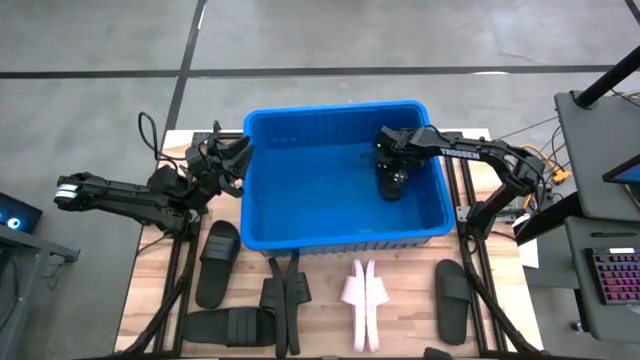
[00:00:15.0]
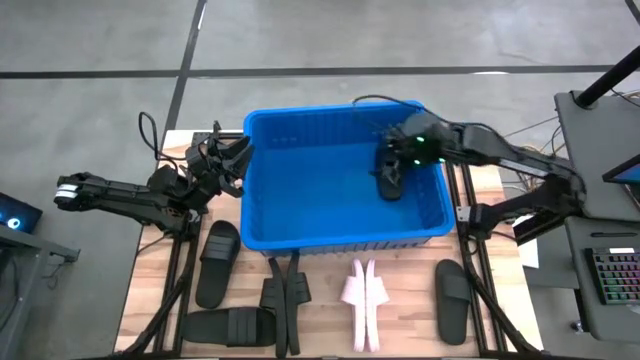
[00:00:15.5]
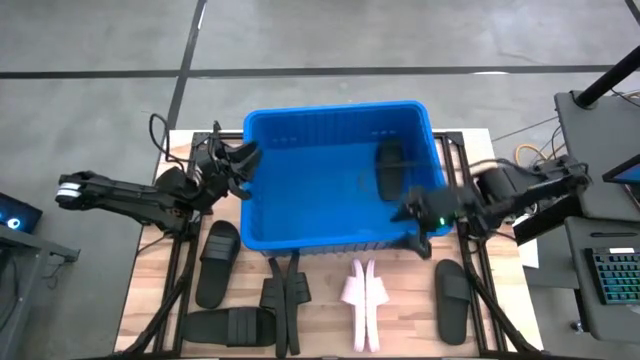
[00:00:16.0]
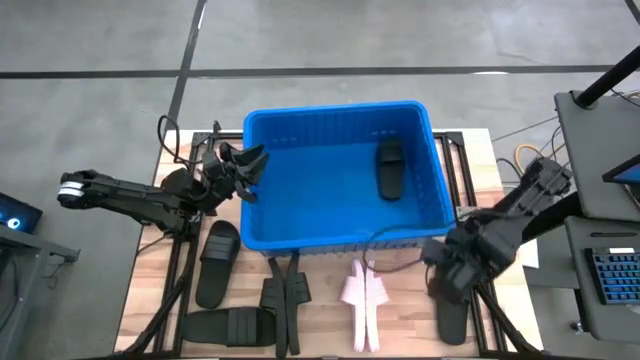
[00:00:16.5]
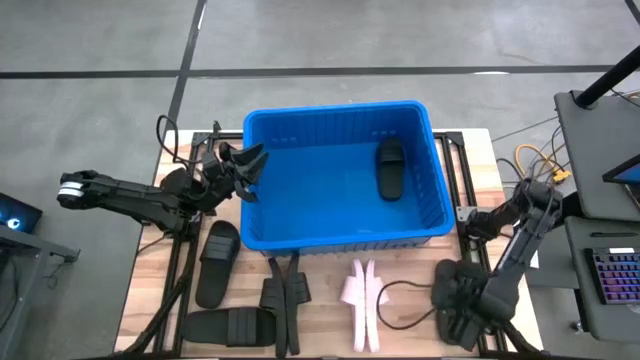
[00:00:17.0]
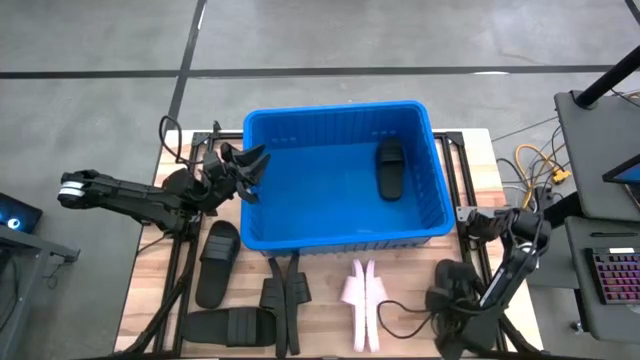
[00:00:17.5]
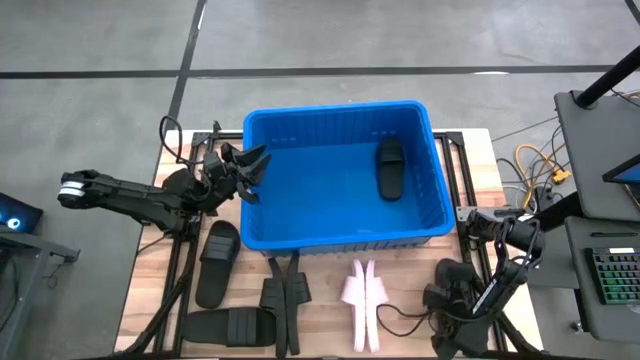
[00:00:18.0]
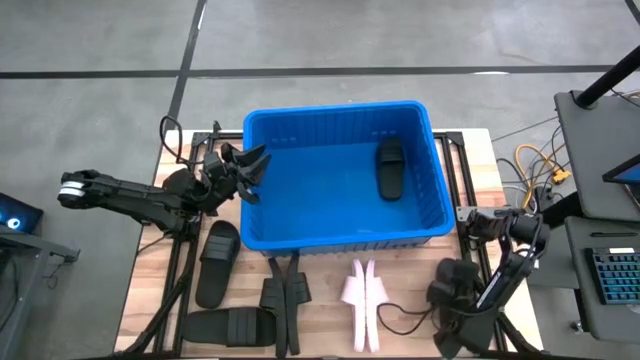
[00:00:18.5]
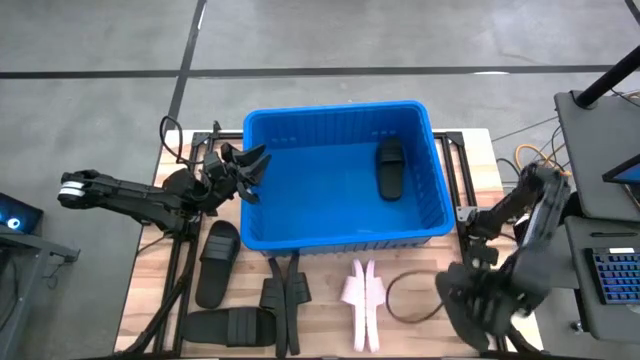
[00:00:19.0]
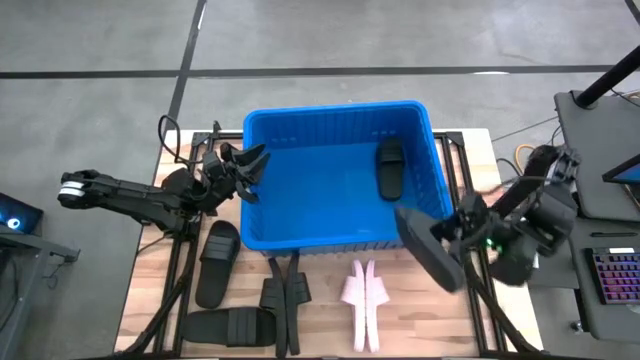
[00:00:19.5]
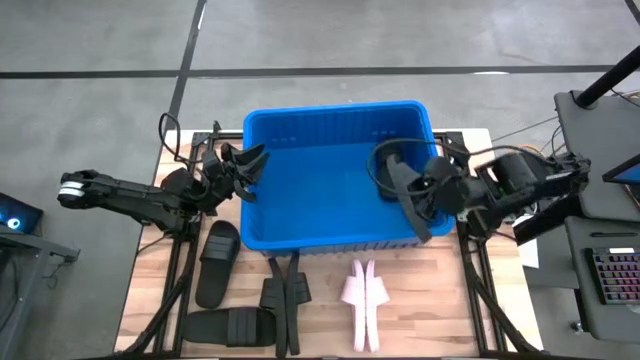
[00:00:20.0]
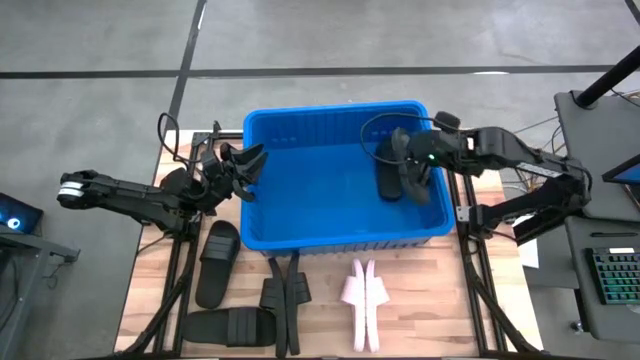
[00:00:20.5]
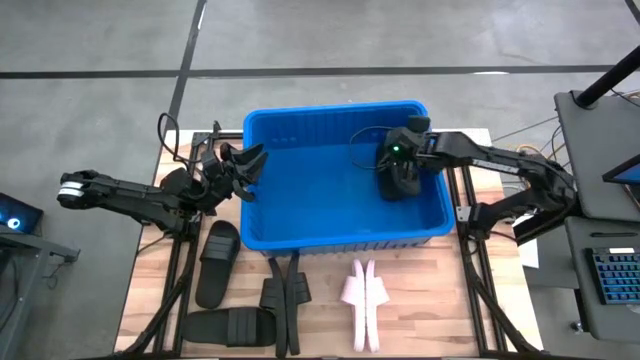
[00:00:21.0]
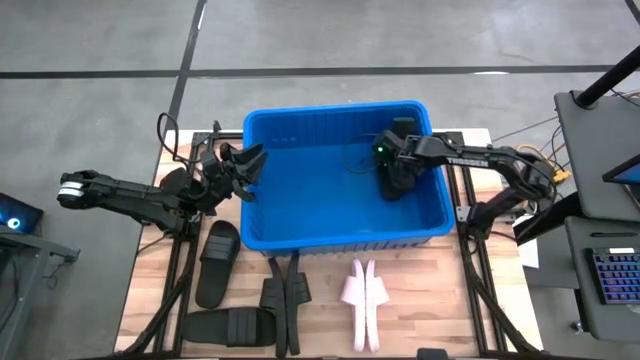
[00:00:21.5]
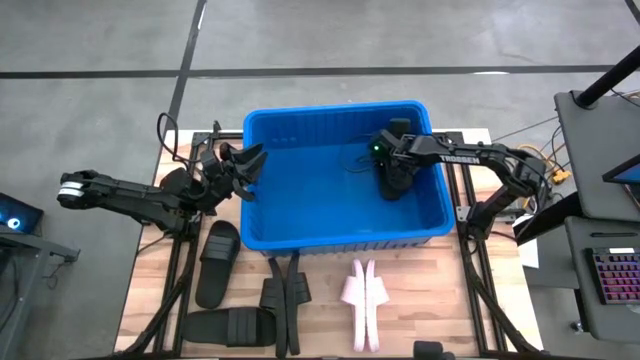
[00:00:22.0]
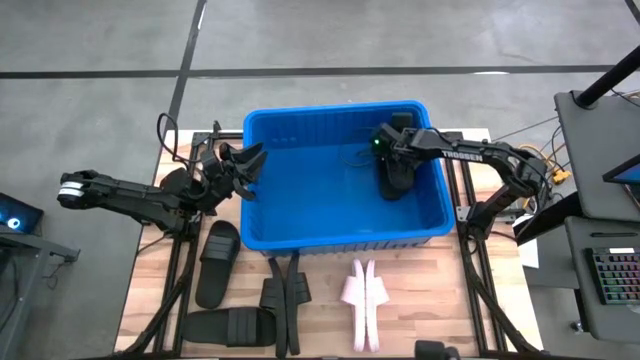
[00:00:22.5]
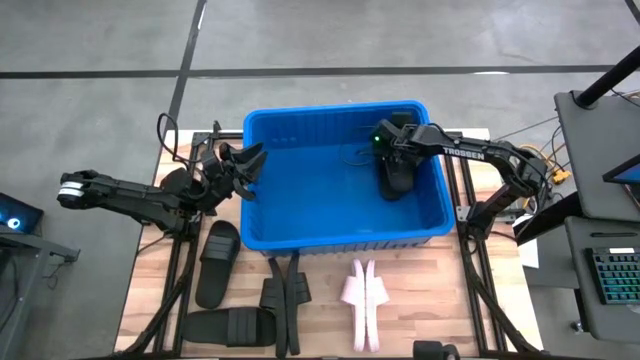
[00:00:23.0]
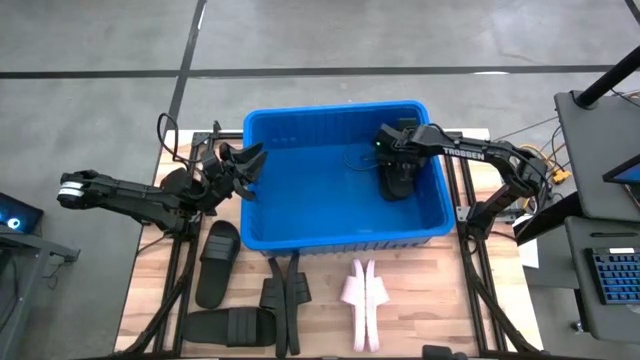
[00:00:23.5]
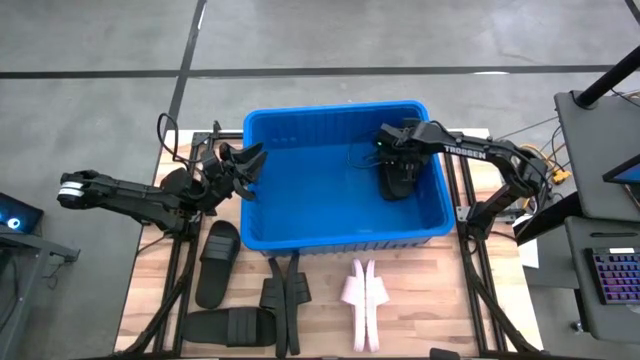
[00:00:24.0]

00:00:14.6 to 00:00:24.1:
Task: Pick and place slides into bin
Put the black slide into the blue bin

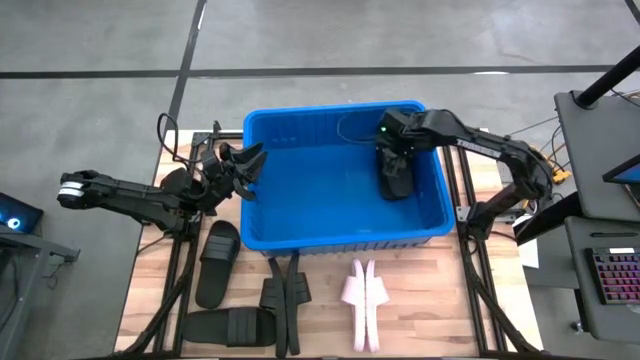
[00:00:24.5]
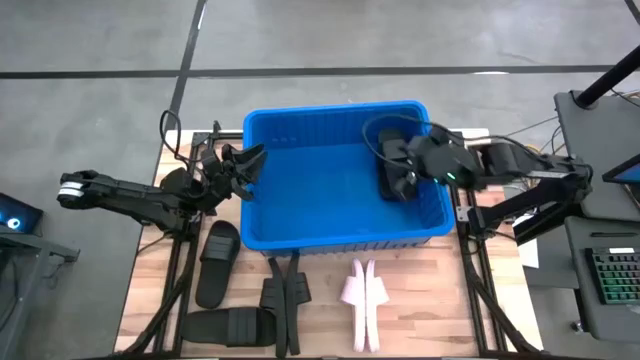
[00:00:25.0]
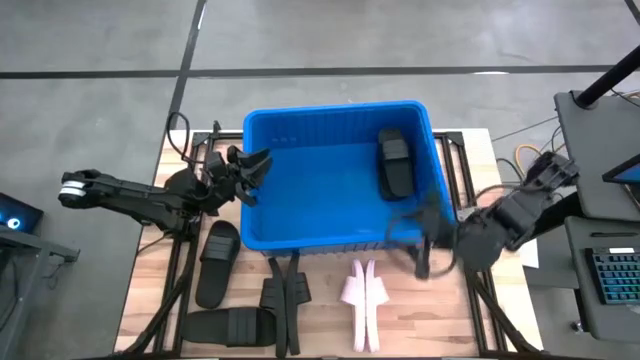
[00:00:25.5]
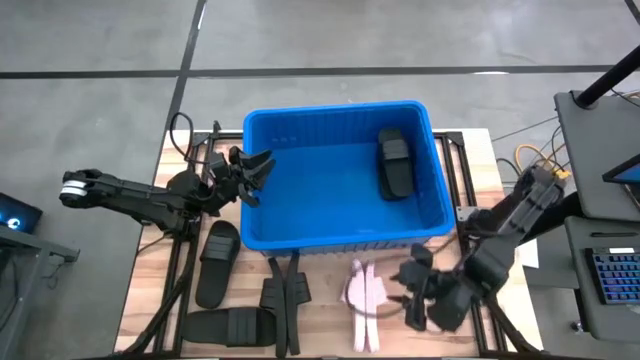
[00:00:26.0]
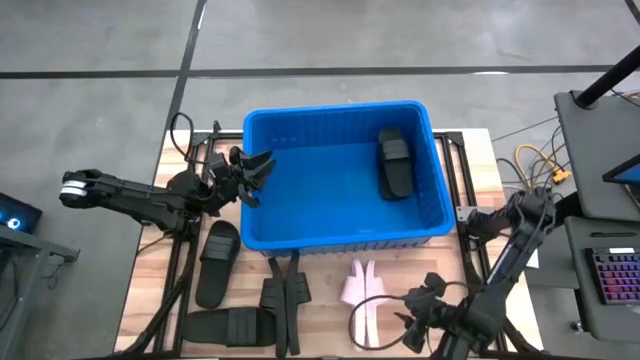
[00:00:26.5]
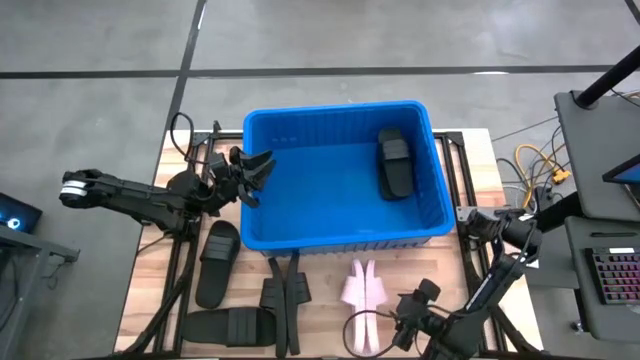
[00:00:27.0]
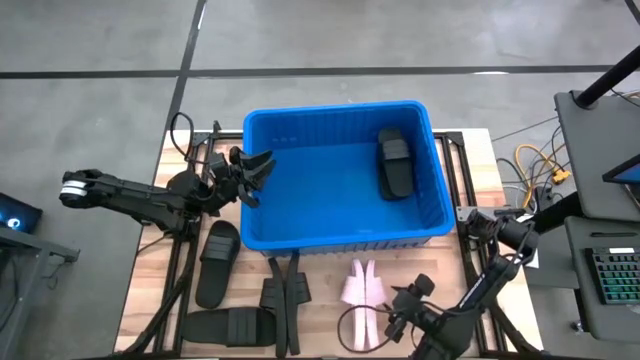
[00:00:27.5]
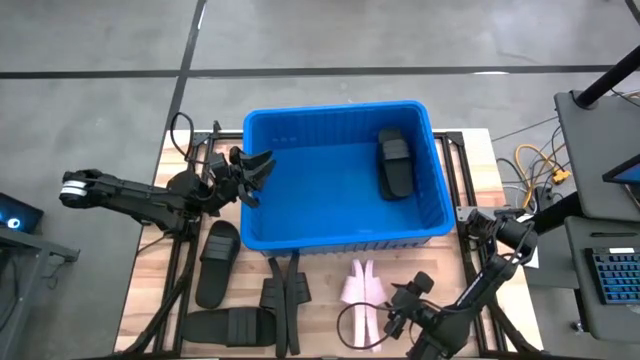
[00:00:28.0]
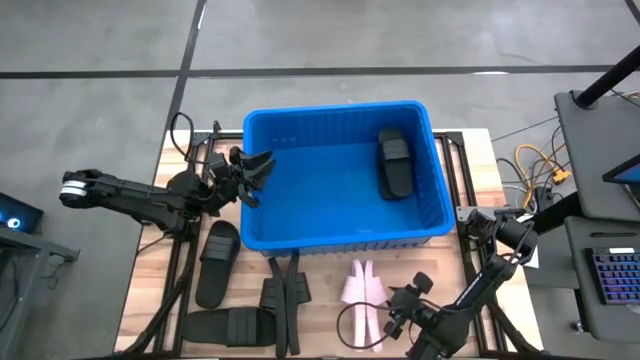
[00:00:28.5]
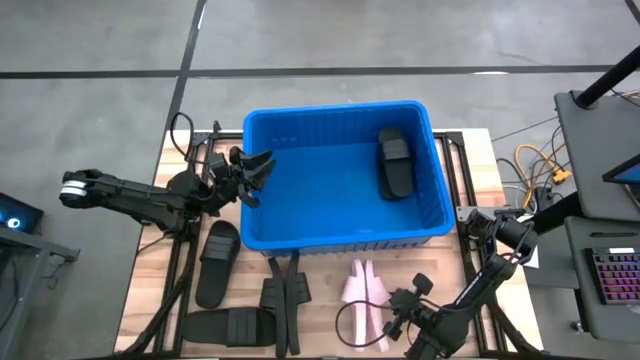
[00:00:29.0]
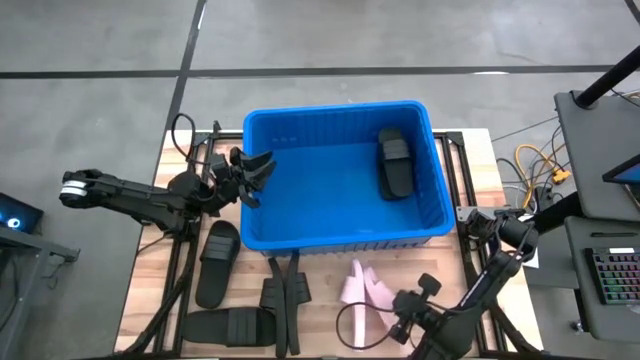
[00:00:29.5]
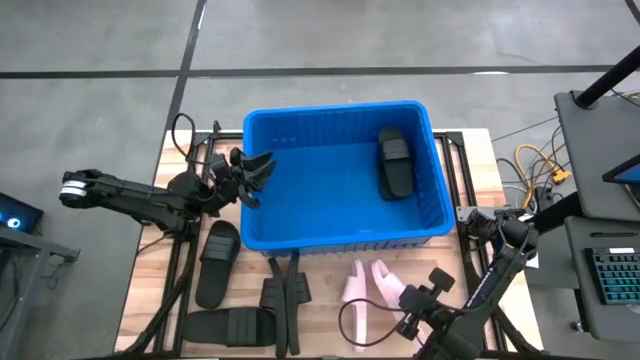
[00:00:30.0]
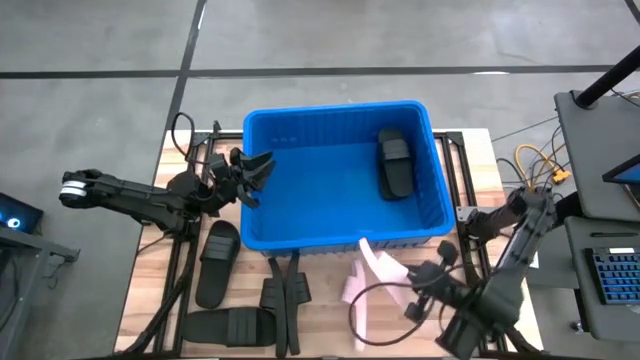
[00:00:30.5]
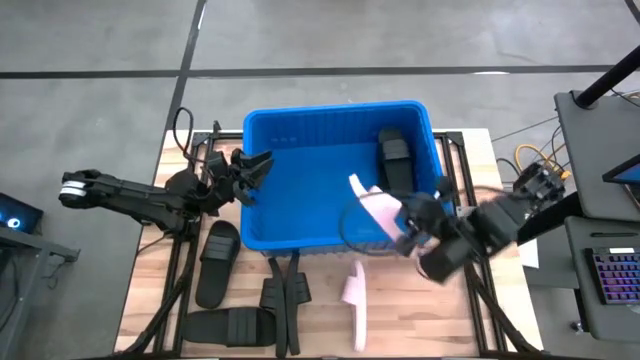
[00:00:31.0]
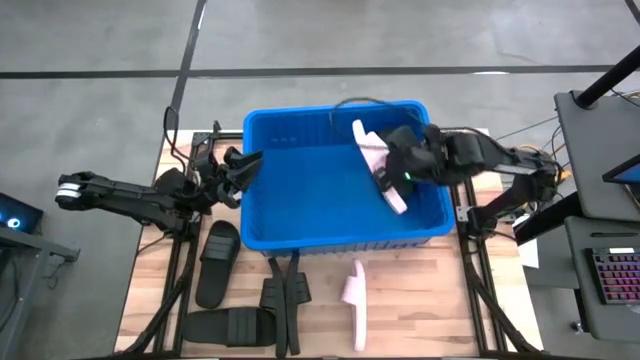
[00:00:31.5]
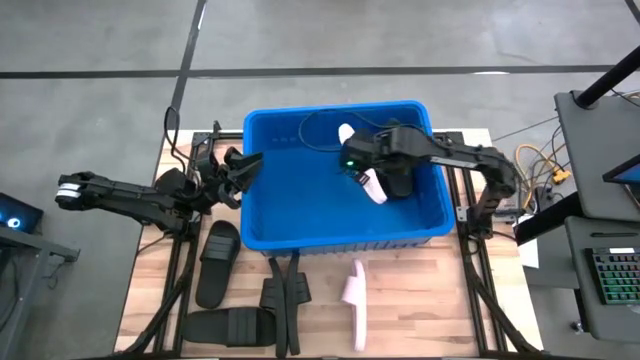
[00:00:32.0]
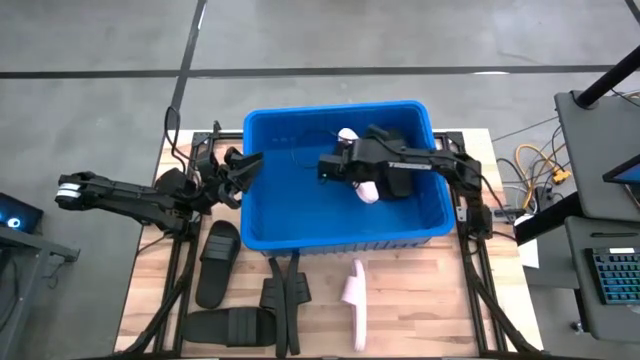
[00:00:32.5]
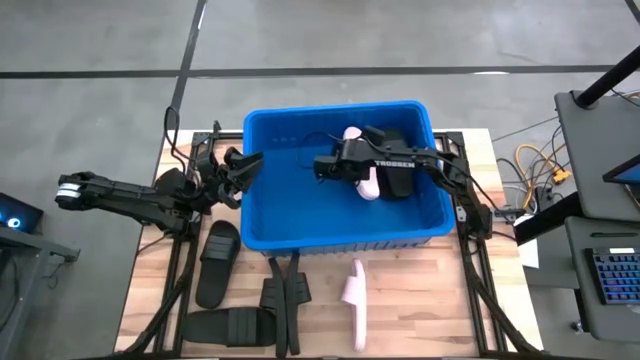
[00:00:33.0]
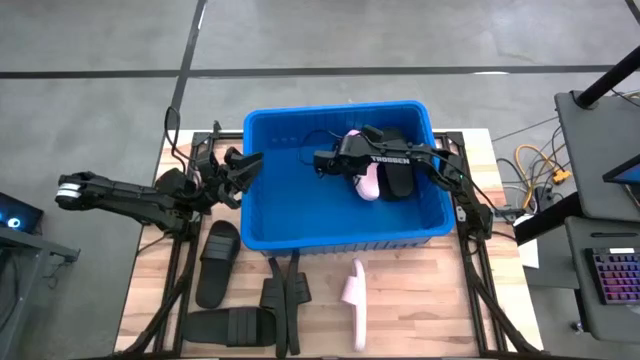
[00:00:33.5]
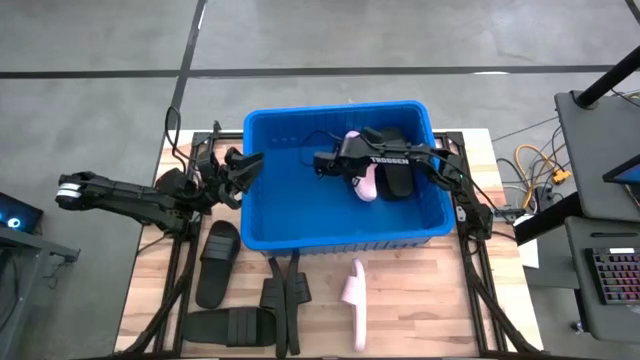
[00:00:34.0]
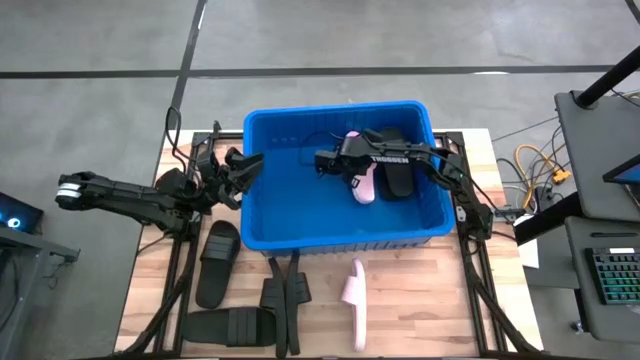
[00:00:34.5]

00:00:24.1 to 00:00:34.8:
Put the pink slide into the blue bin
